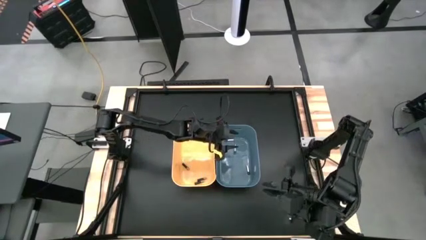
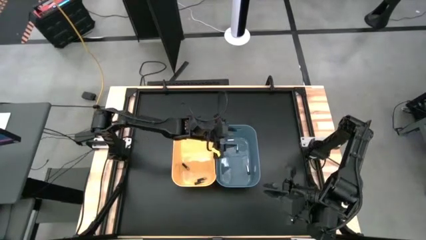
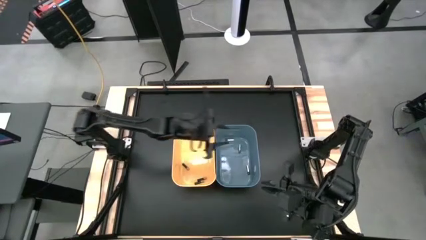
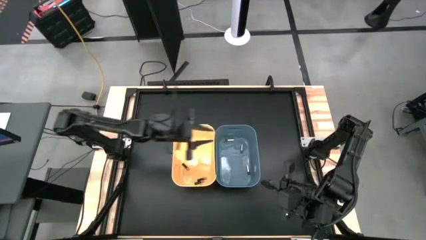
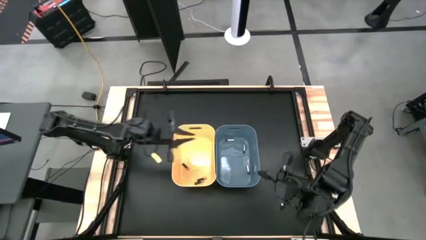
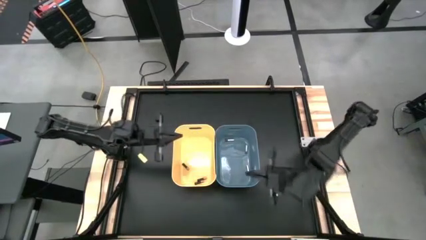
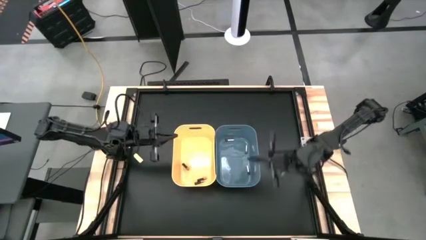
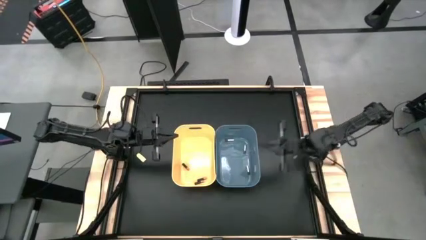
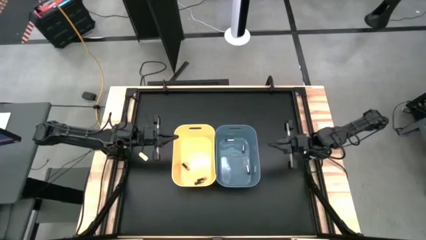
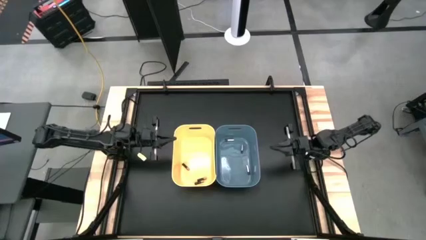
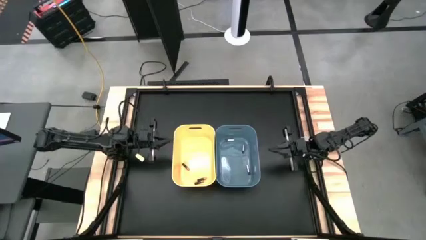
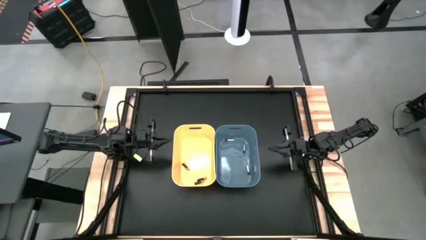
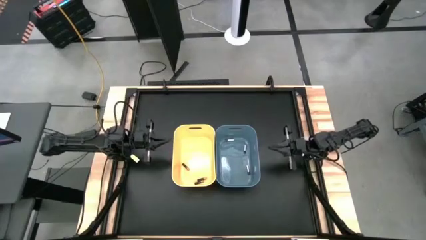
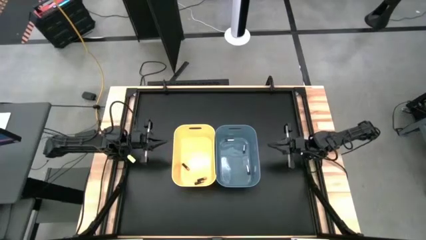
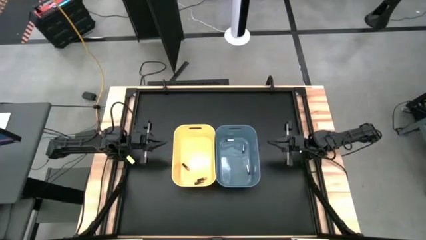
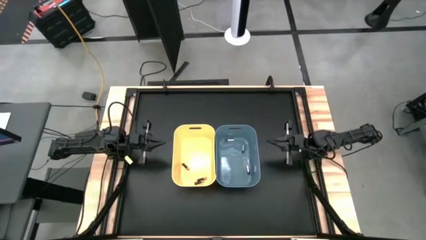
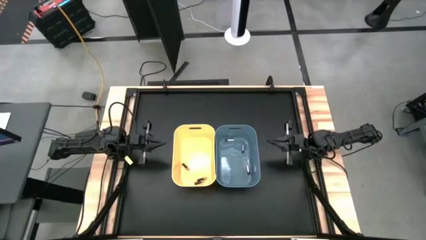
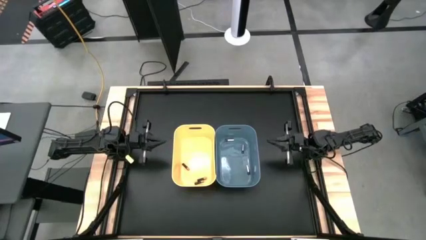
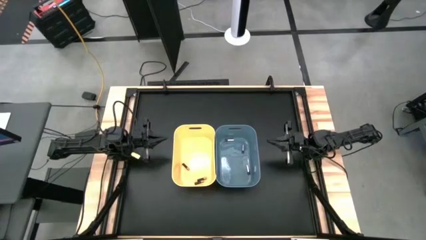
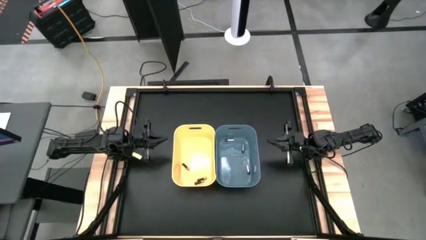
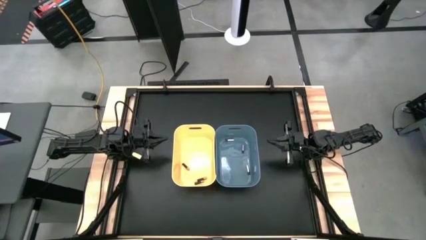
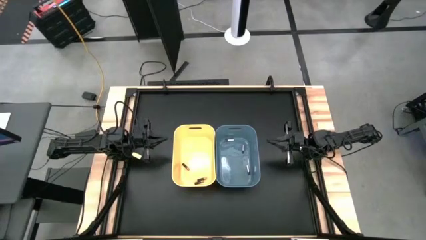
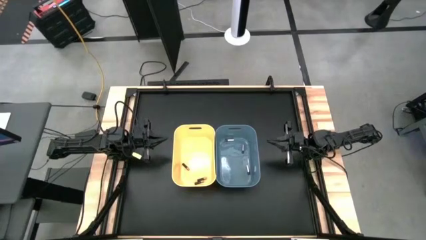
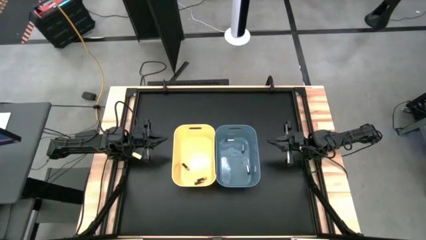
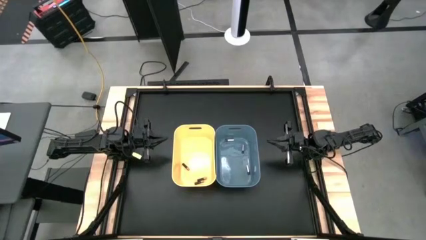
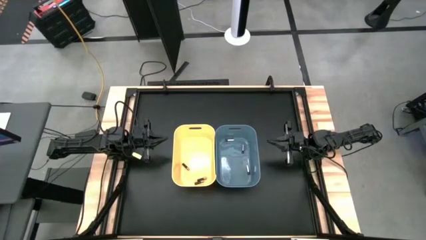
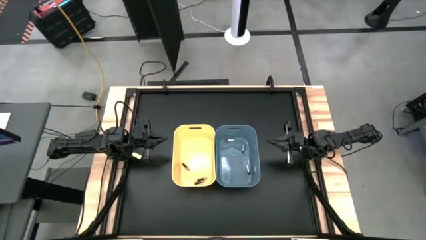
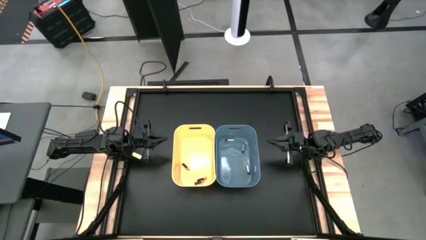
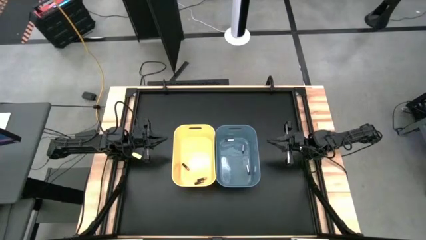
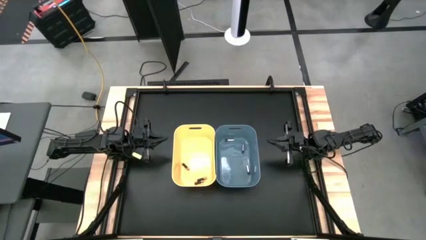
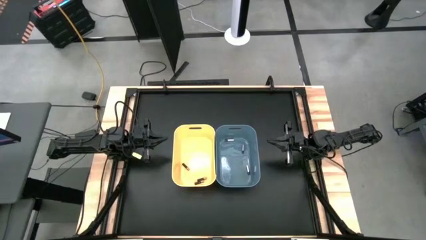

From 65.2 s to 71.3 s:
Task: Sort batteries
Return to Home Position

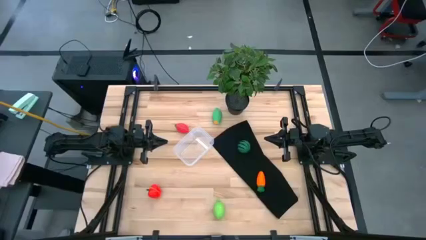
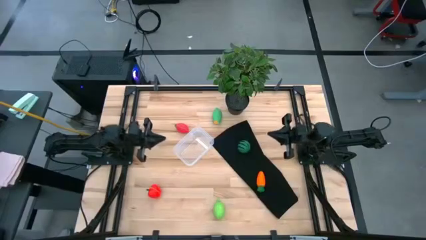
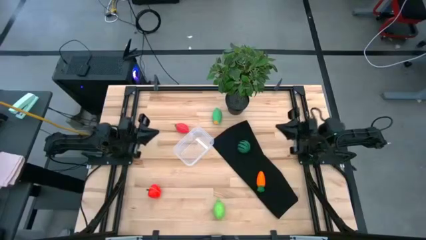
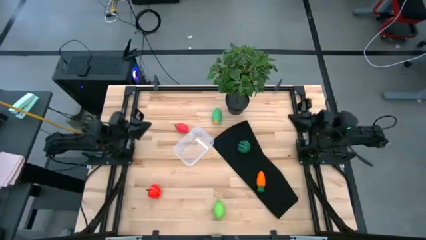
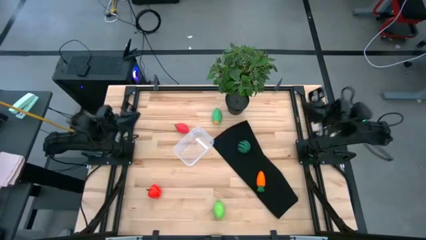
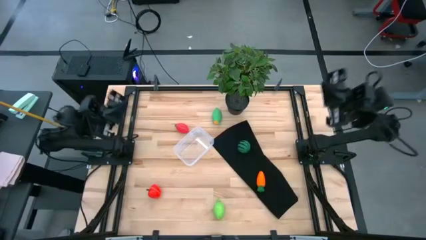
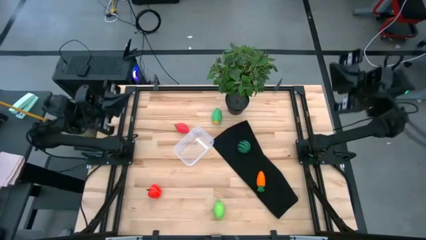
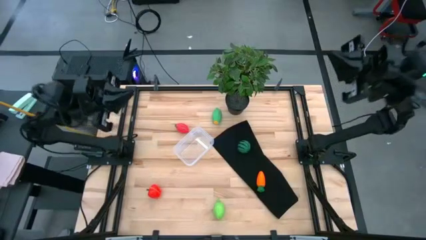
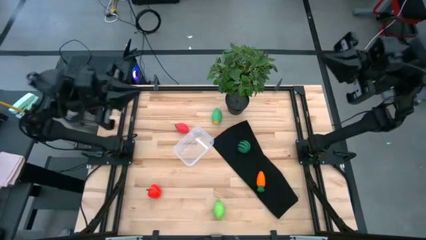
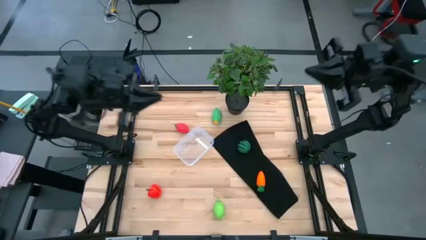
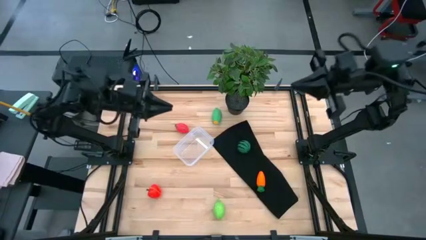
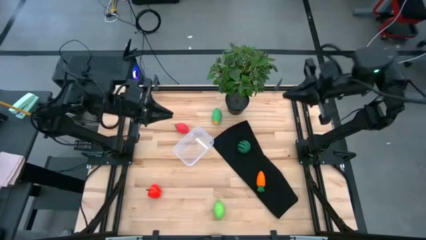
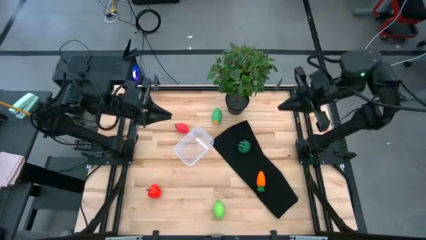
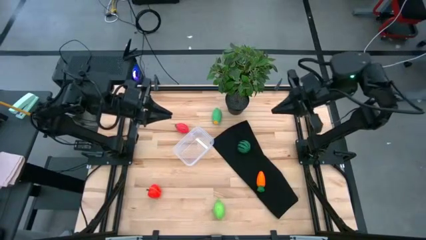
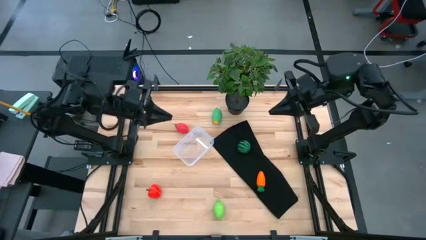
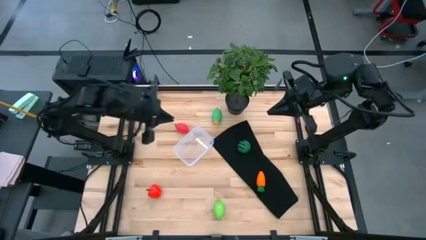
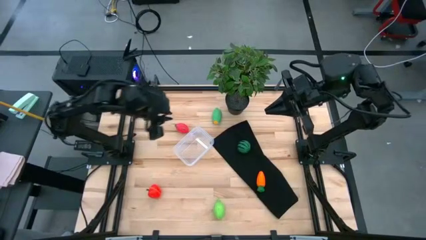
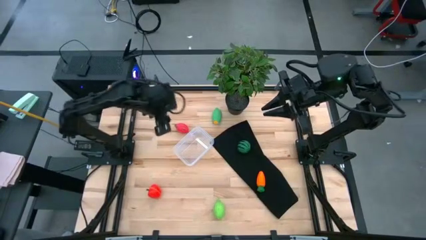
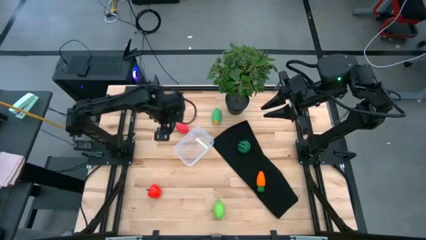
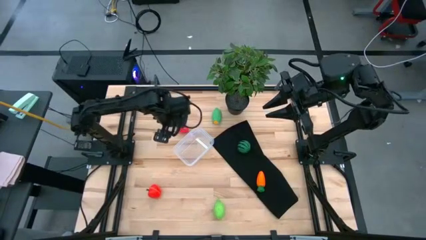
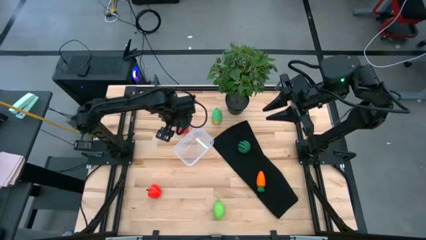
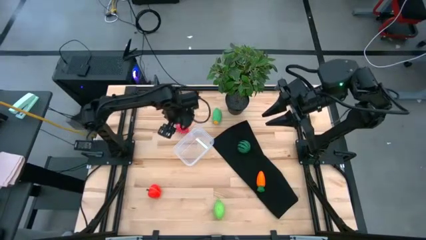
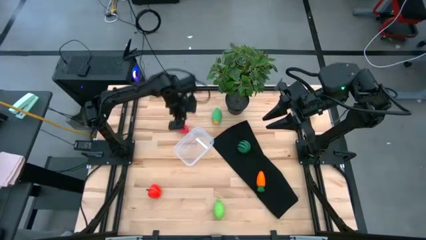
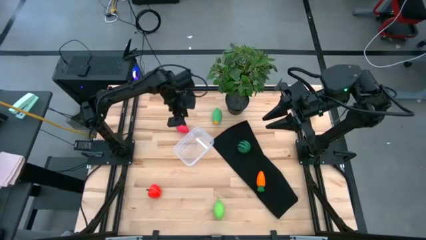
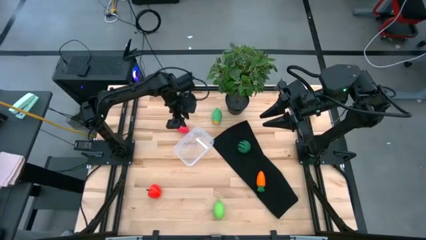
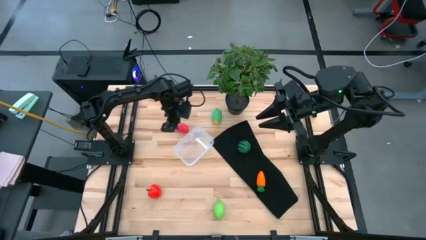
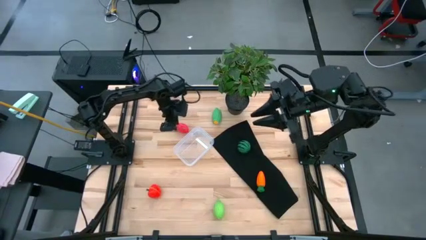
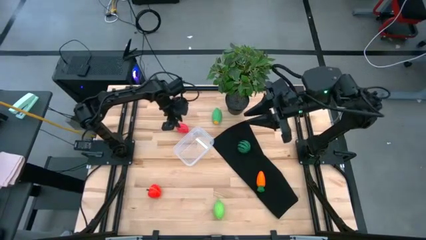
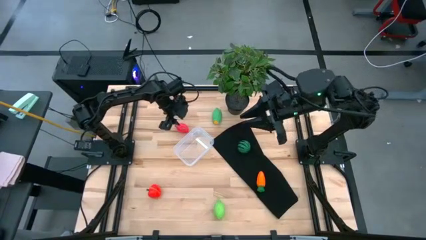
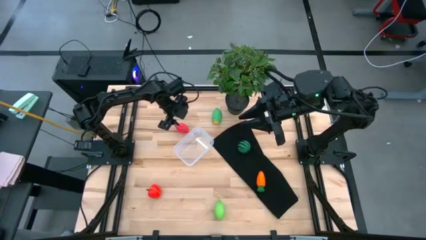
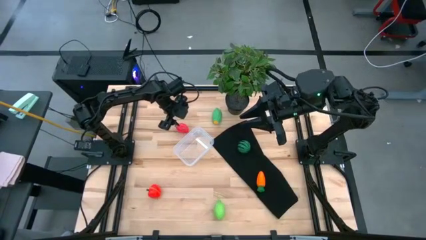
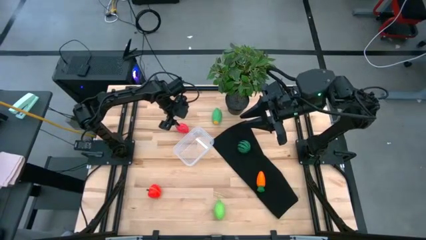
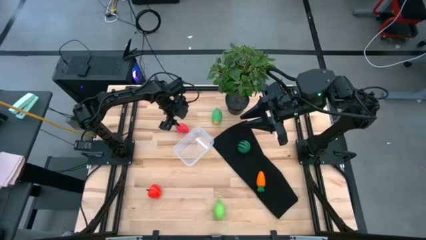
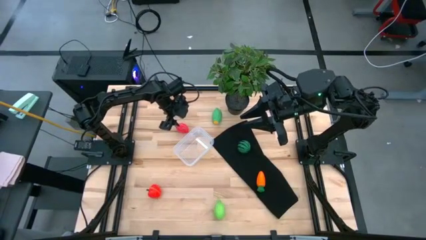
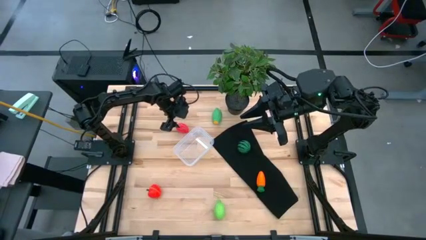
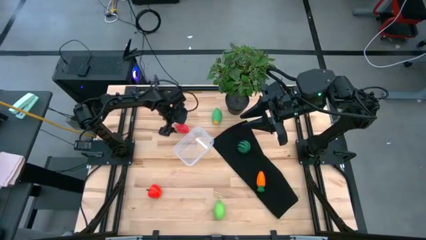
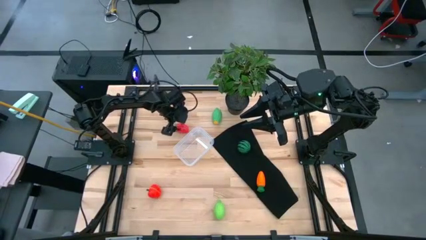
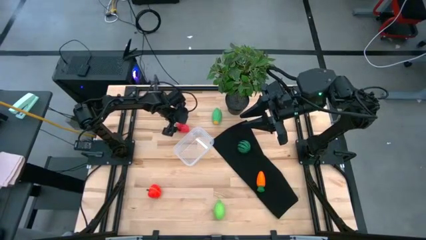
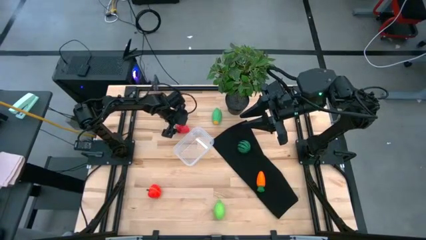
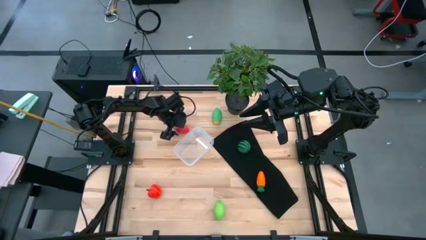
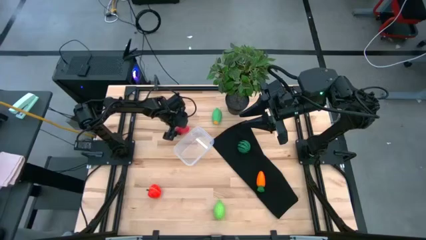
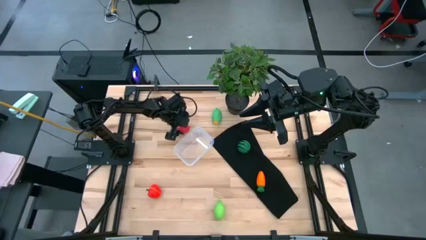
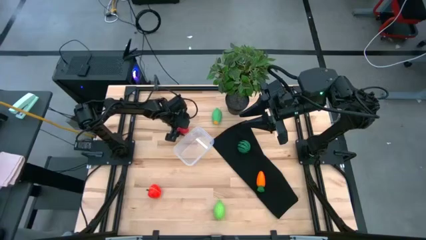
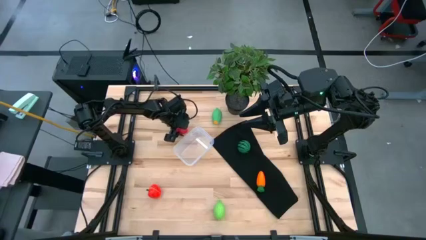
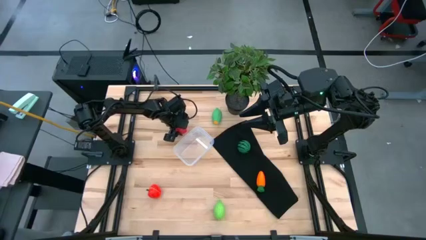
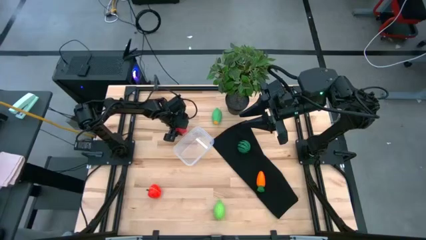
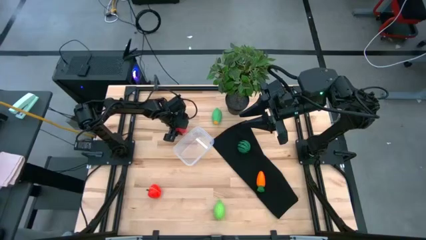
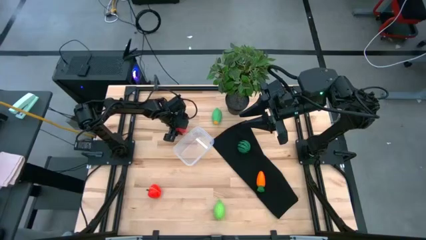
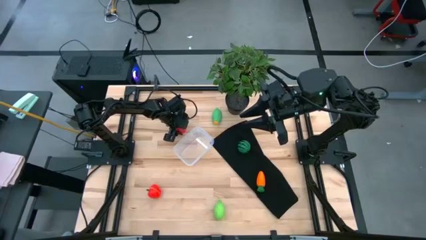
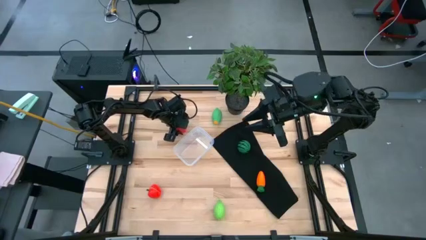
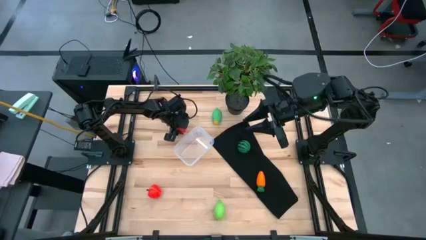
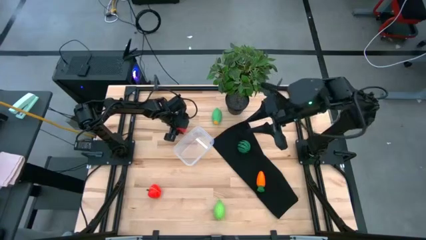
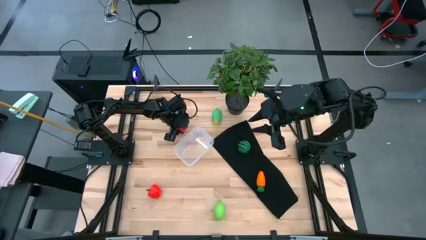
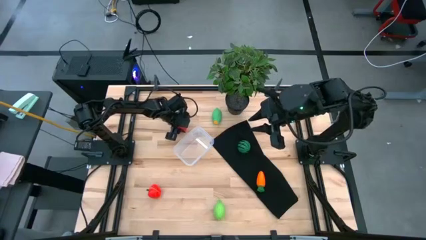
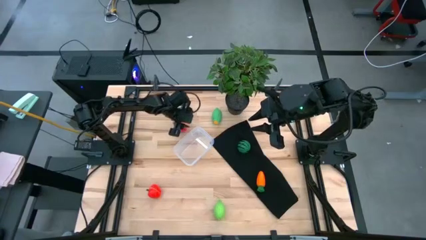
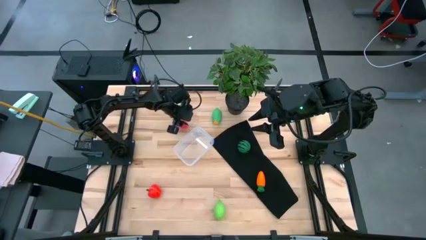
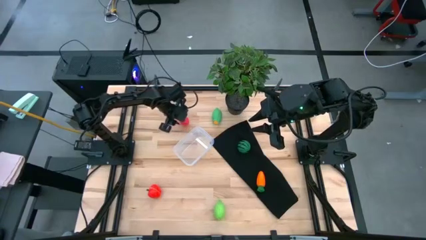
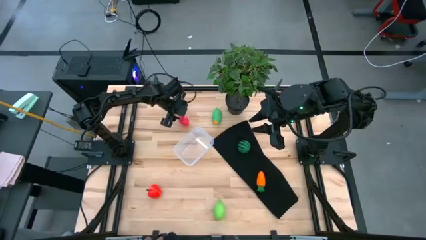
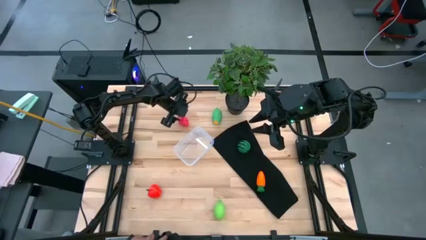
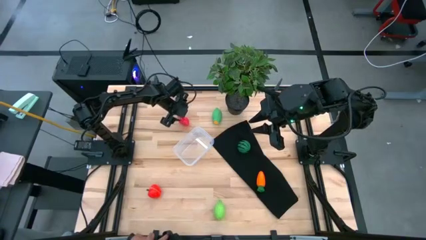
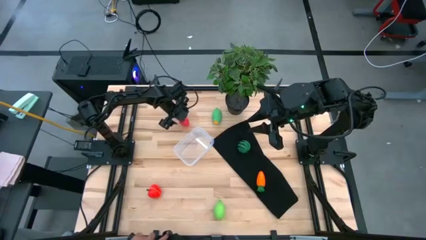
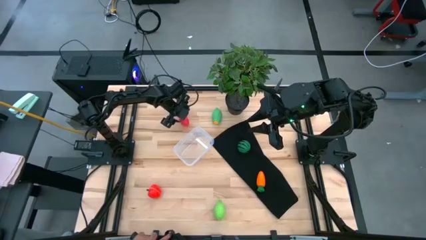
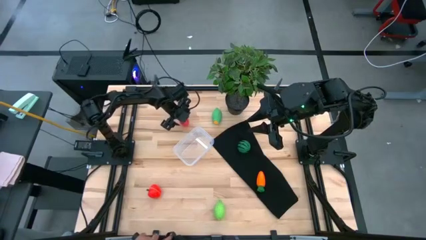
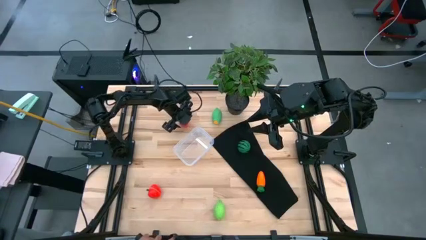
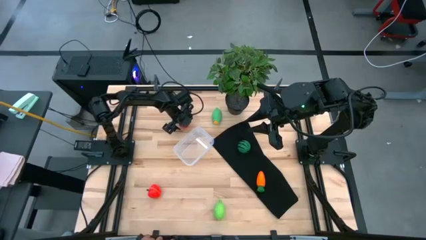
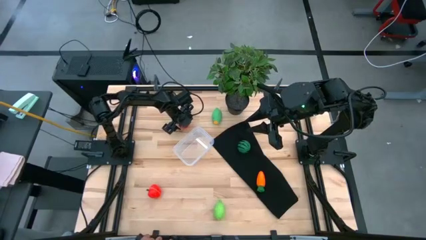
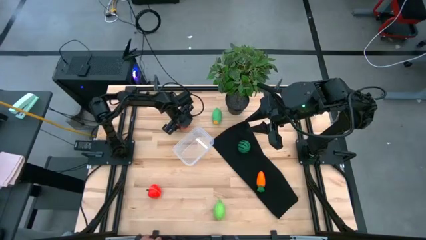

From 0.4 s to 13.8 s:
Task: Pick and placing Produce into tupperware
Put the red dragon fruit into the transparent bin
